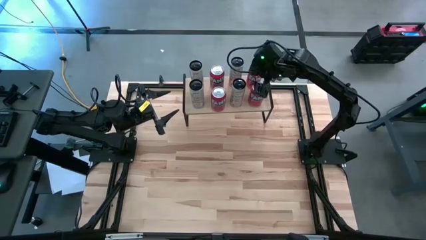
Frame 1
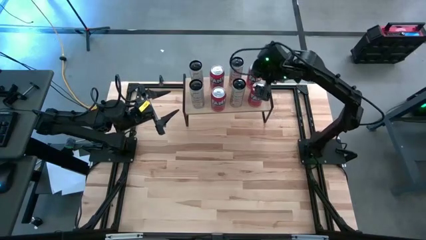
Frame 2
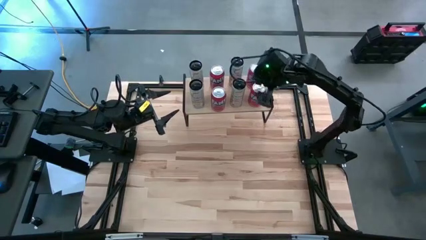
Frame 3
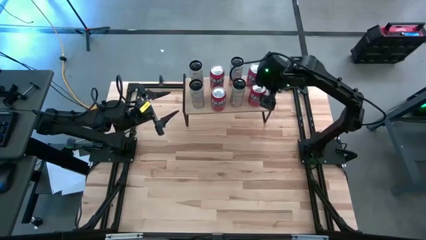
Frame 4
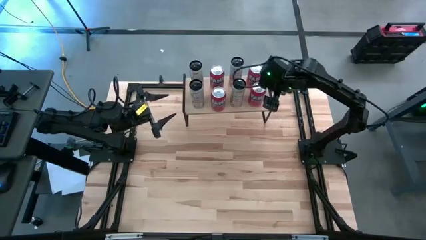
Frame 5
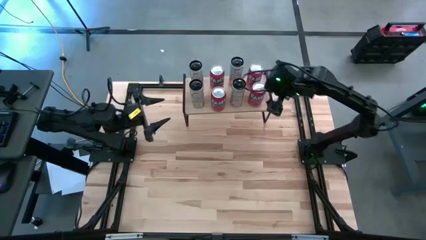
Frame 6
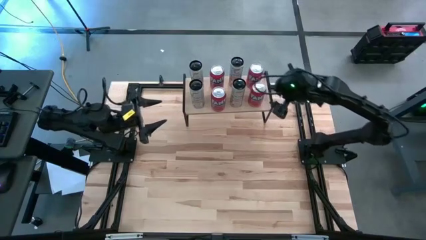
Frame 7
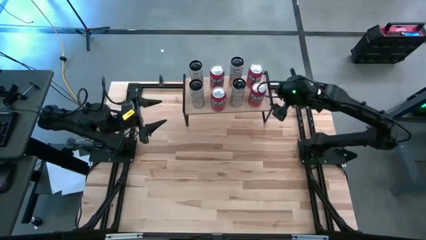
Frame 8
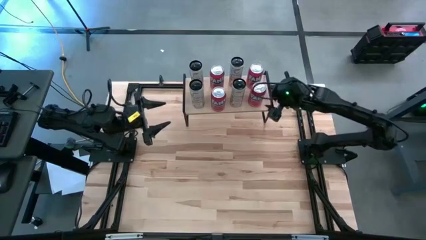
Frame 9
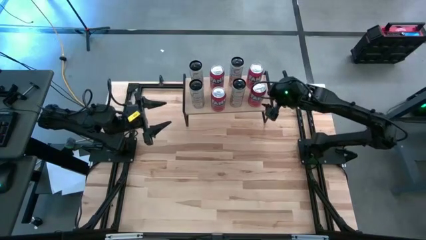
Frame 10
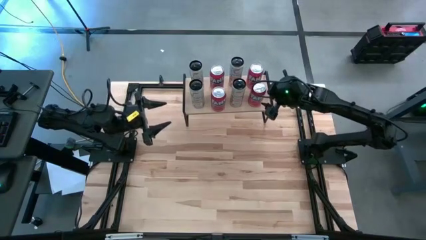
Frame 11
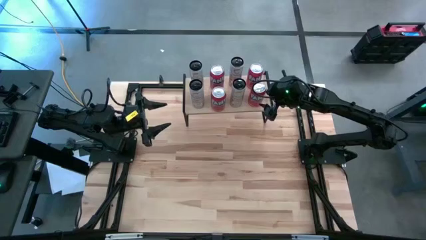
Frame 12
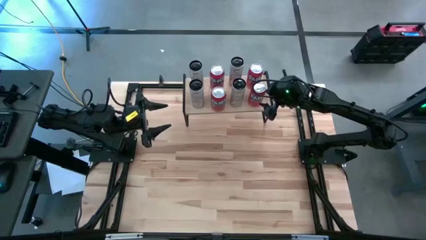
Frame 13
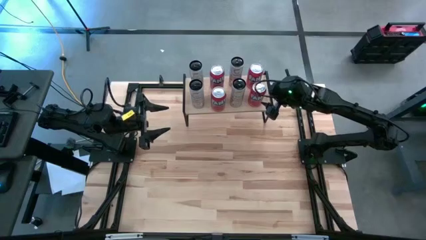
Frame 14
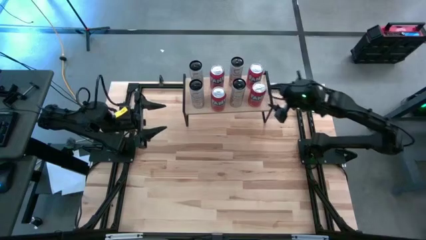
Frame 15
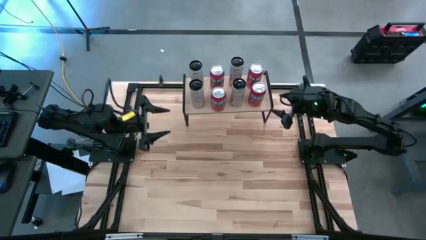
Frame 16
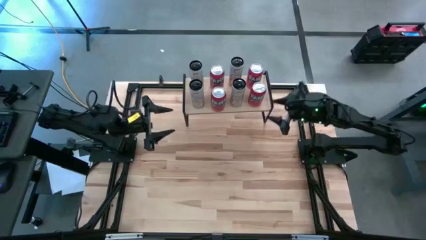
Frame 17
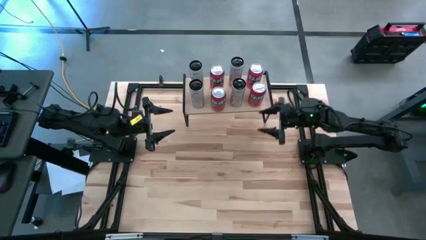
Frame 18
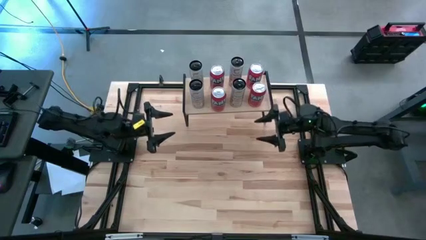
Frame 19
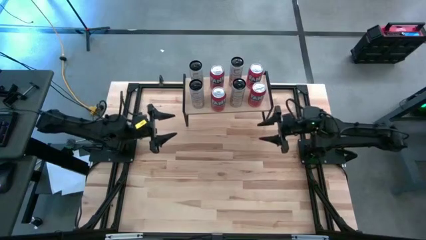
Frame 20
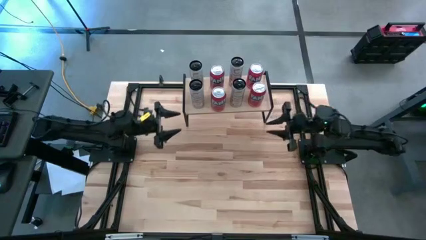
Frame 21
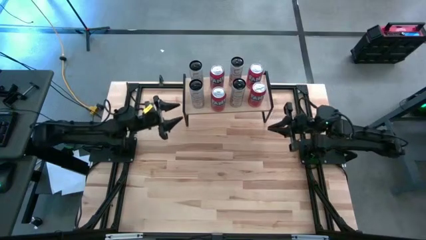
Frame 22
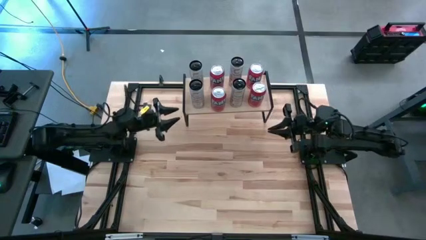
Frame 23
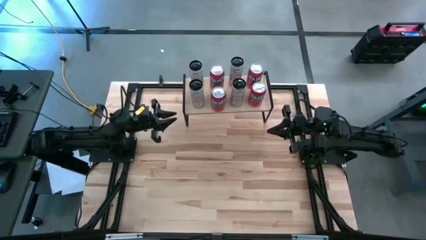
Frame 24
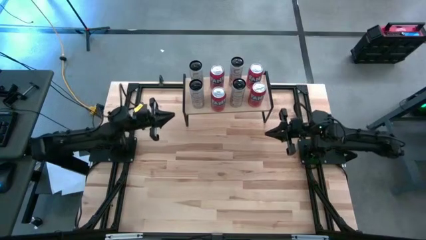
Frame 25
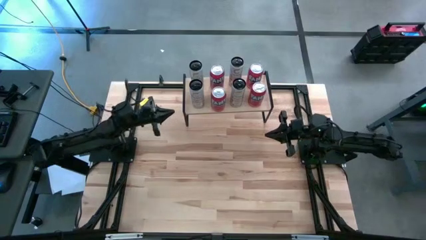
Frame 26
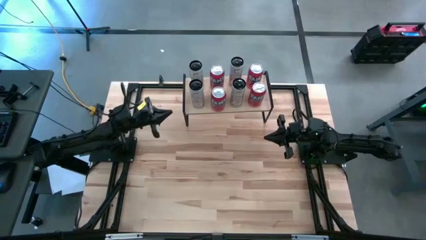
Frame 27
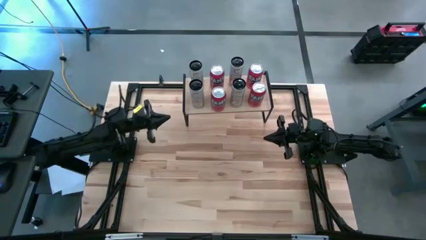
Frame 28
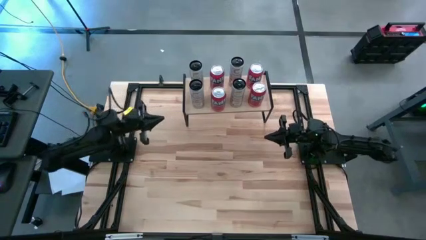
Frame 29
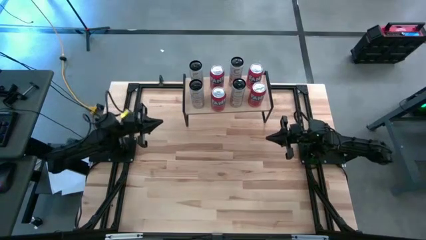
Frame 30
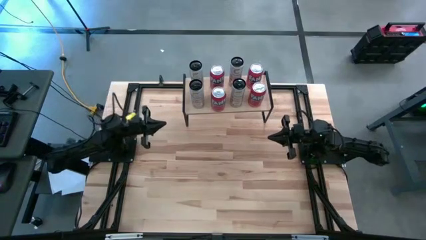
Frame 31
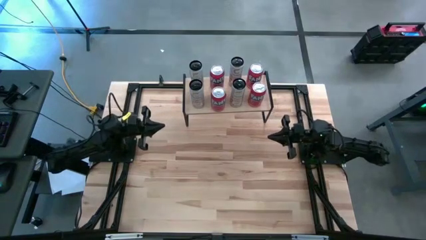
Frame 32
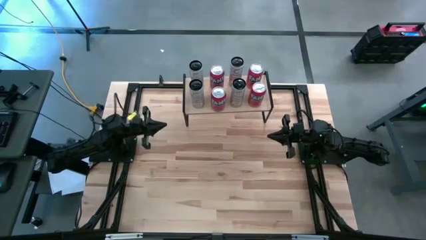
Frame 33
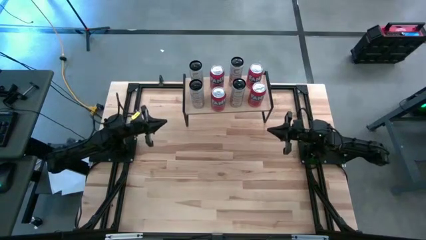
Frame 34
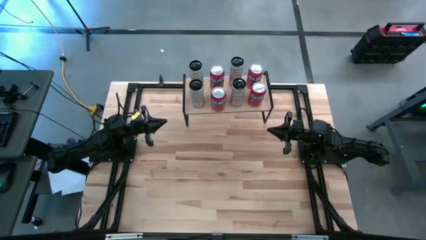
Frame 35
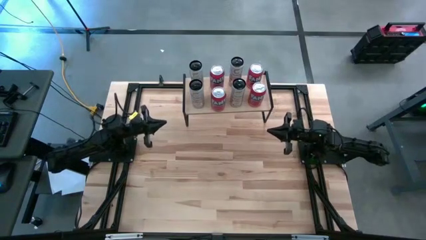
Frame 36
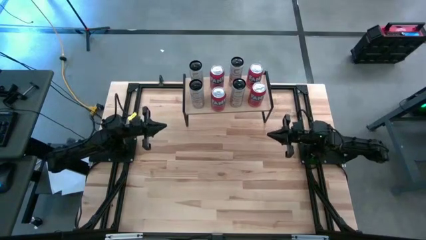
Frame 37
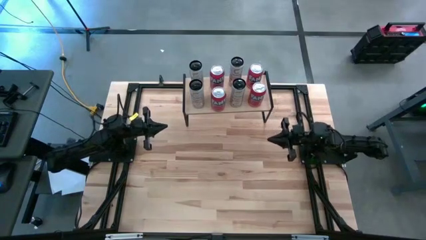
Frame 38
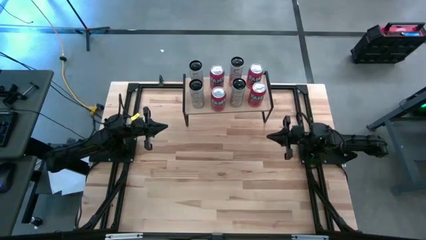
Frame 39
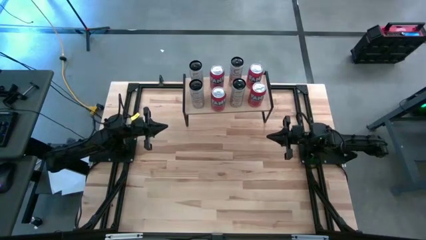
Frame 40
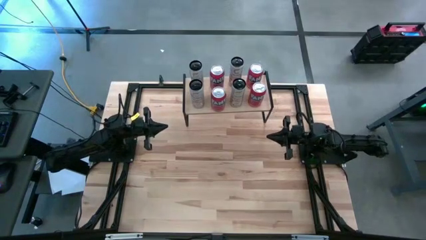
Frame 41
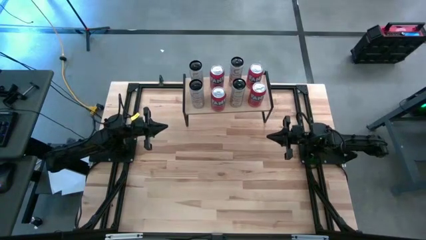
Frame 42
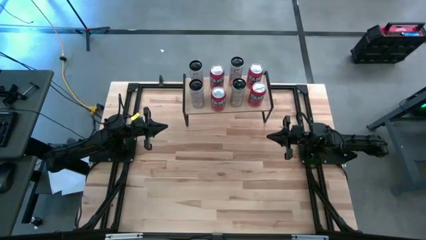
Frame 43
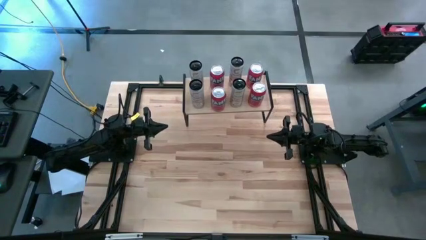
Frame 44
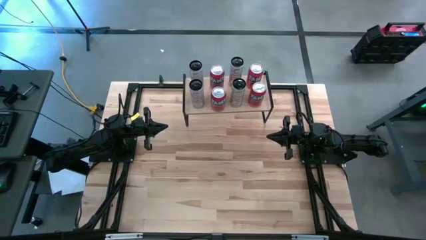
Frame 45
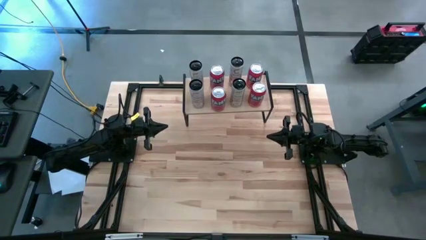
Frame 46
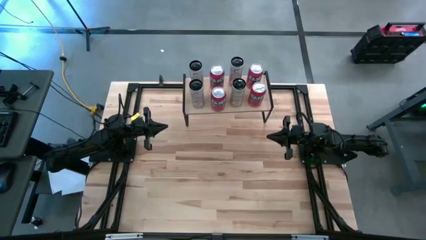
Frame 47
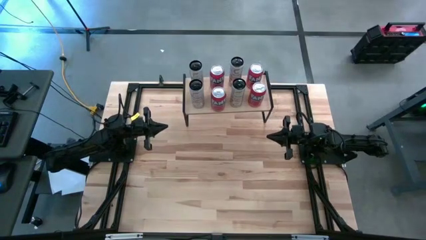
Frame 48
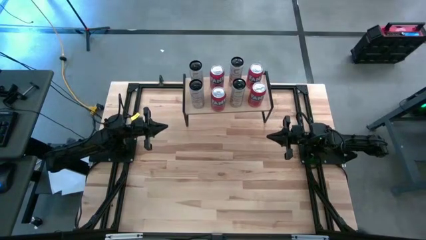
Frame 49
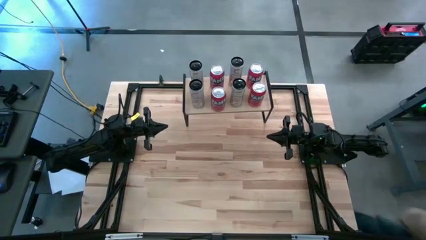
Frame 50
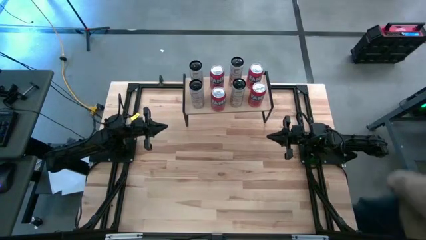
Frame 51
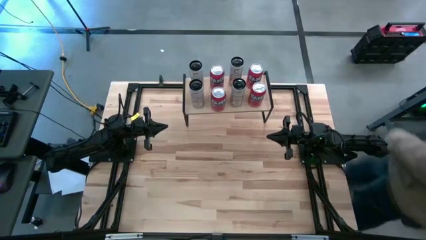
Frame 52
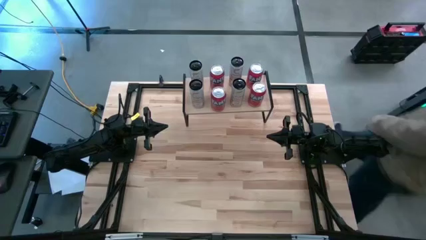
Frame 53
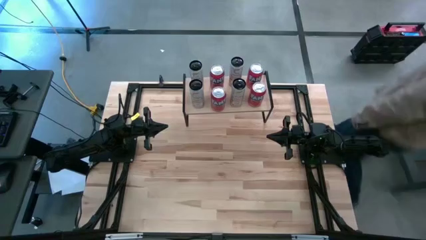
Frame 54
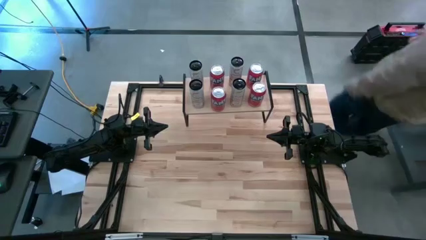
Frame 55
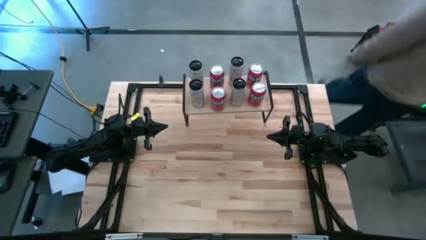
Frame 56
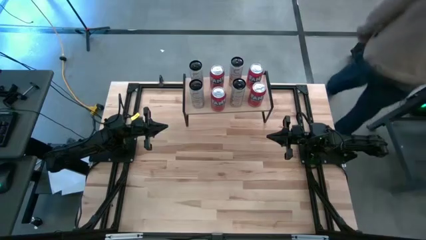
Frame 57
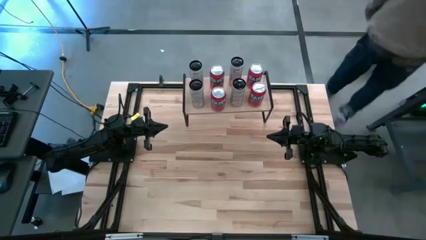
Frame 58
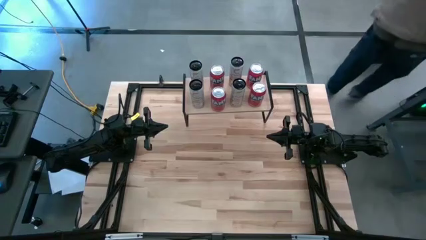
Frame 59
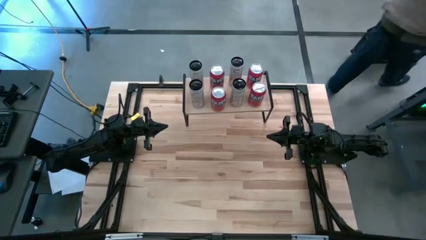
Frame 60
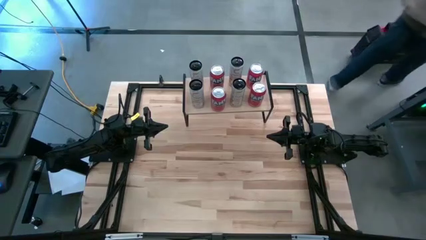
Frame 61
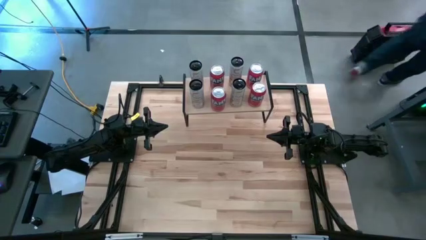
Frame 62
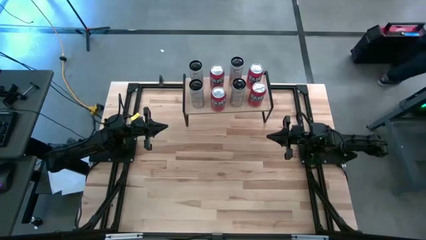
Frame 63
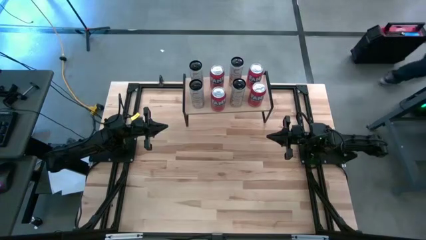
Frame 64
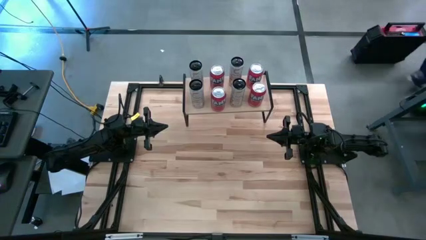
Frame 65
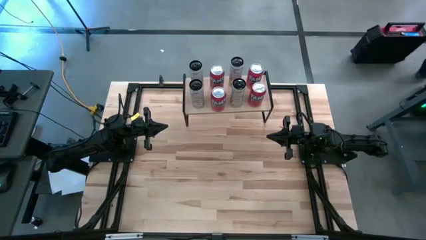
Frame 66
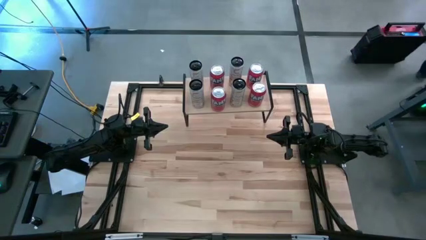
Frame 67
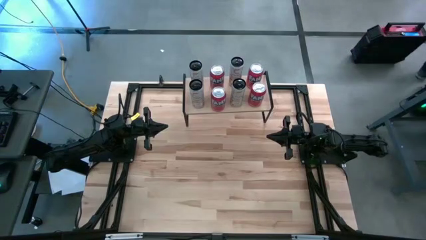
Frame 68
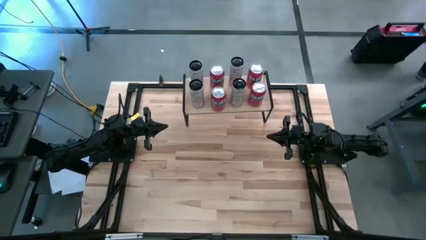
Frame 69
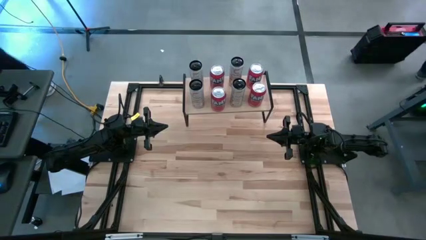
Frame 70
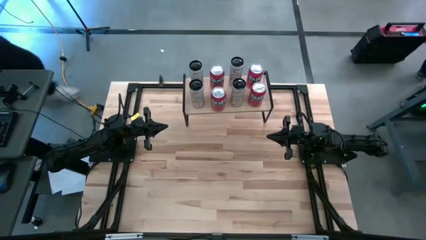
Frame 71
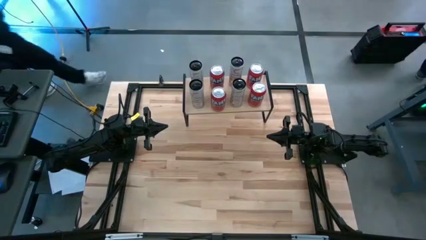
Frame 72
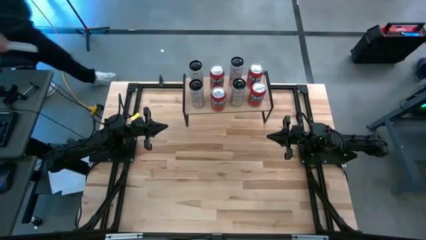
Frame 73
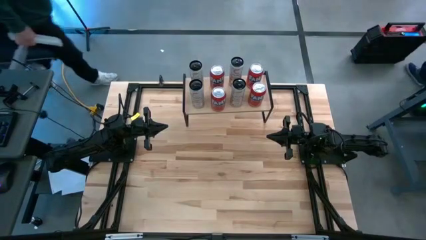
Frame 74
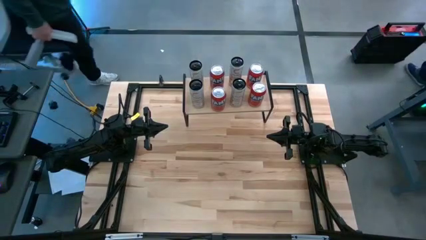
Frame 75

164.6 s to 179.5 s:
Task: Place canned beverage on shelf
Return to Home Position
